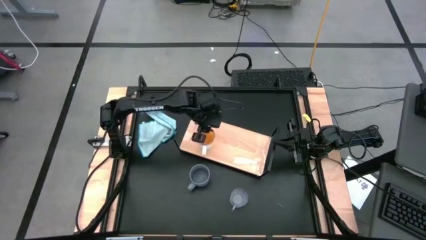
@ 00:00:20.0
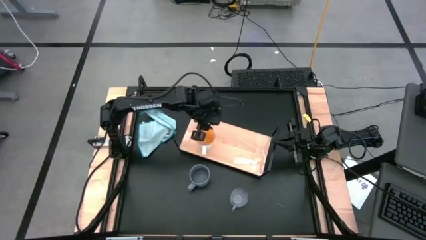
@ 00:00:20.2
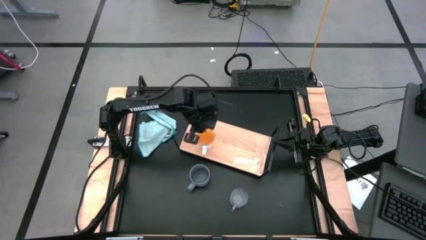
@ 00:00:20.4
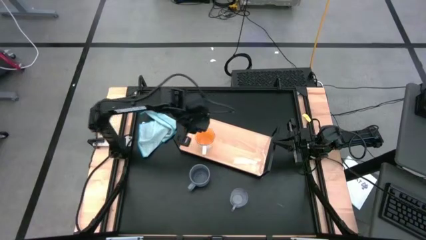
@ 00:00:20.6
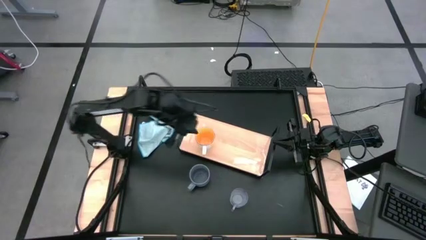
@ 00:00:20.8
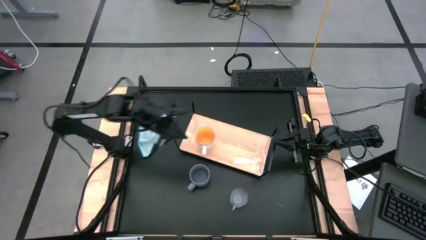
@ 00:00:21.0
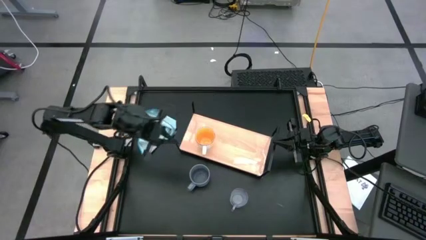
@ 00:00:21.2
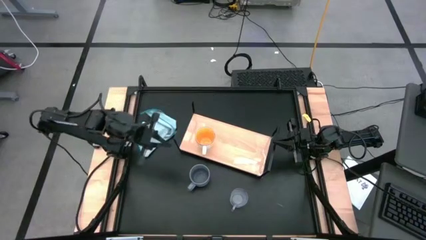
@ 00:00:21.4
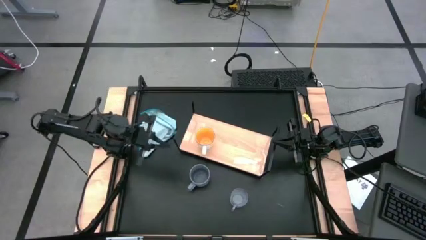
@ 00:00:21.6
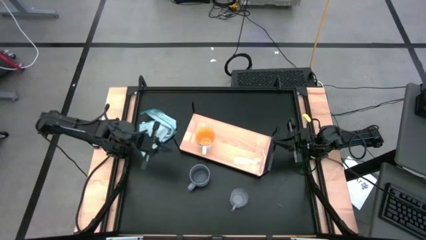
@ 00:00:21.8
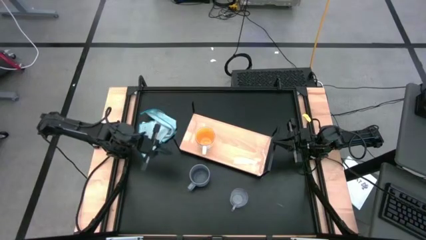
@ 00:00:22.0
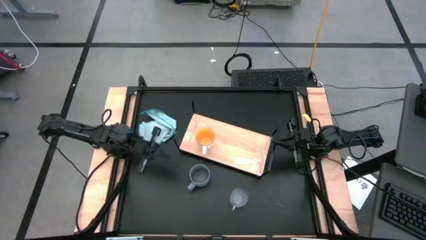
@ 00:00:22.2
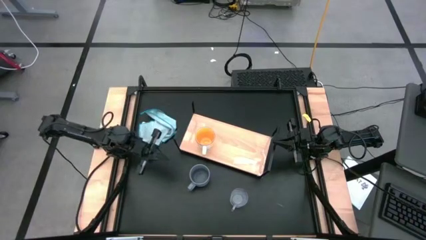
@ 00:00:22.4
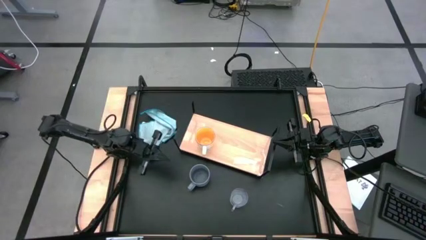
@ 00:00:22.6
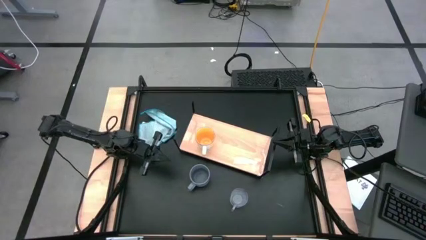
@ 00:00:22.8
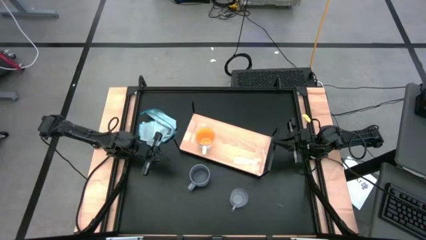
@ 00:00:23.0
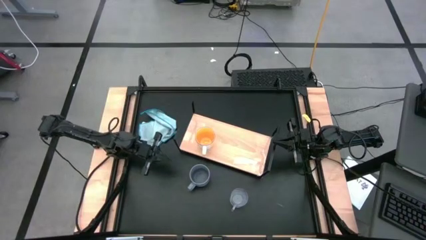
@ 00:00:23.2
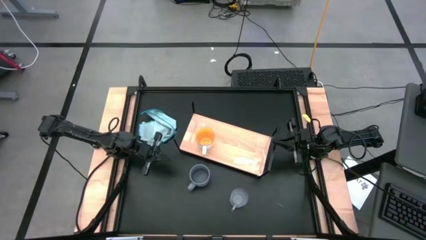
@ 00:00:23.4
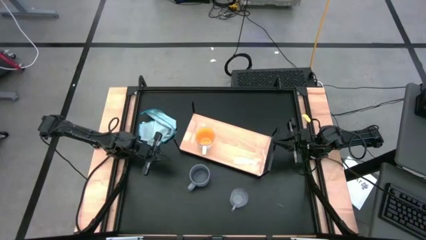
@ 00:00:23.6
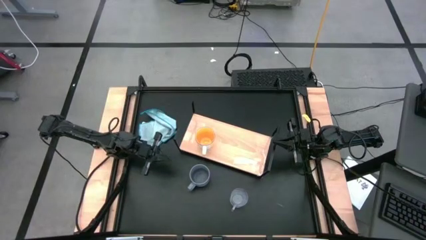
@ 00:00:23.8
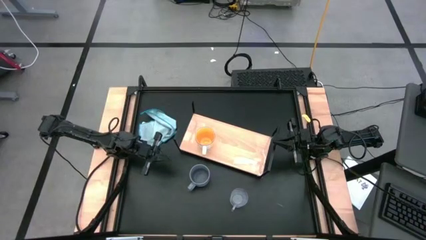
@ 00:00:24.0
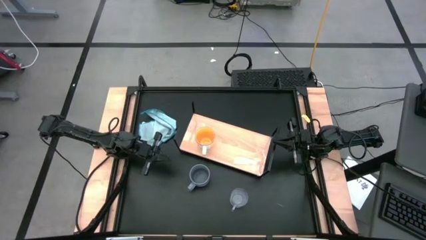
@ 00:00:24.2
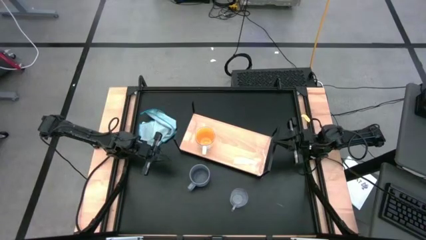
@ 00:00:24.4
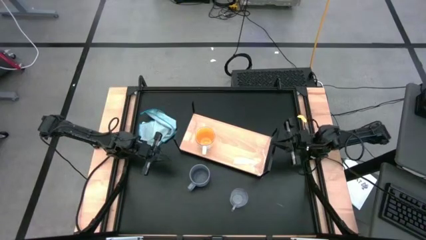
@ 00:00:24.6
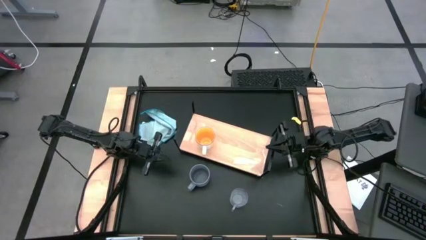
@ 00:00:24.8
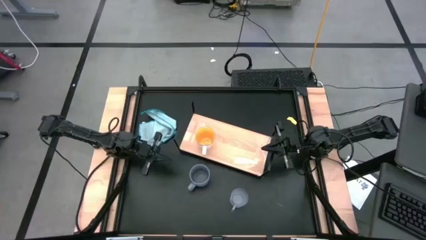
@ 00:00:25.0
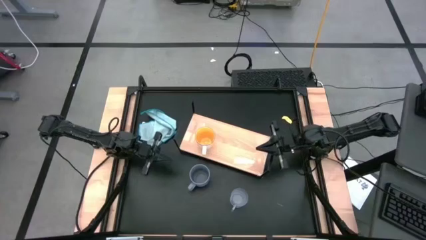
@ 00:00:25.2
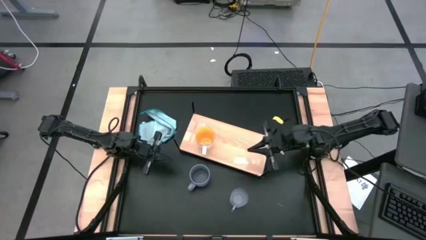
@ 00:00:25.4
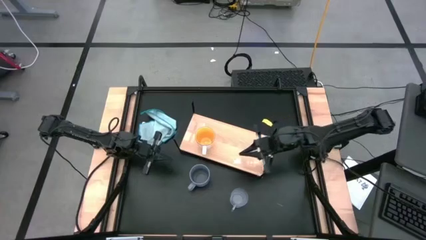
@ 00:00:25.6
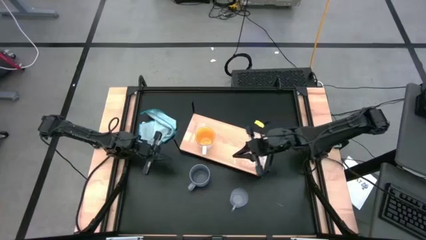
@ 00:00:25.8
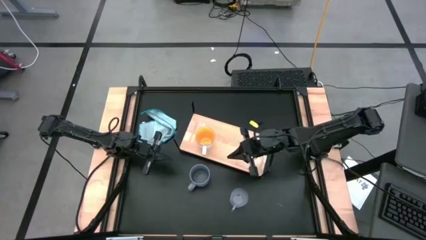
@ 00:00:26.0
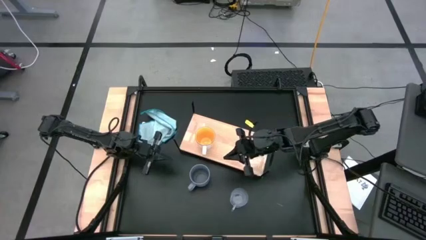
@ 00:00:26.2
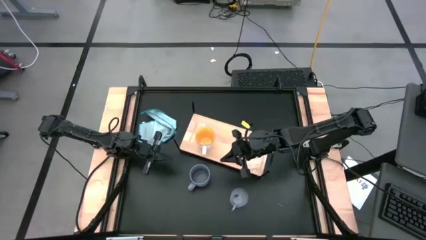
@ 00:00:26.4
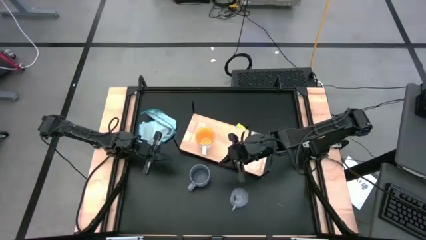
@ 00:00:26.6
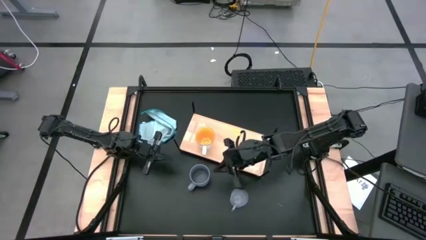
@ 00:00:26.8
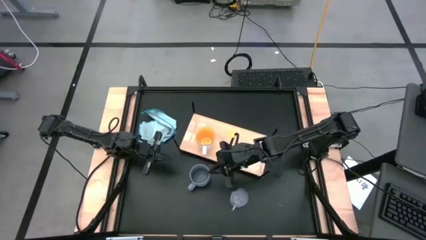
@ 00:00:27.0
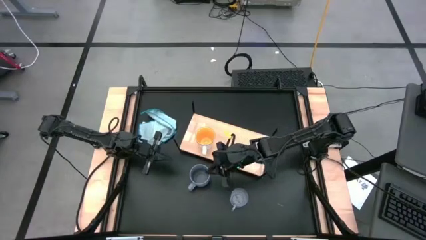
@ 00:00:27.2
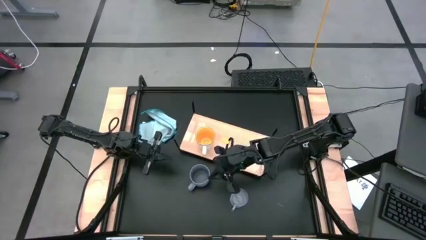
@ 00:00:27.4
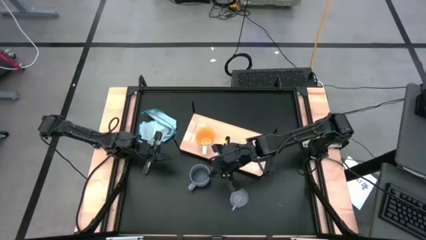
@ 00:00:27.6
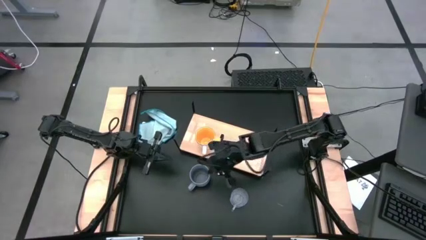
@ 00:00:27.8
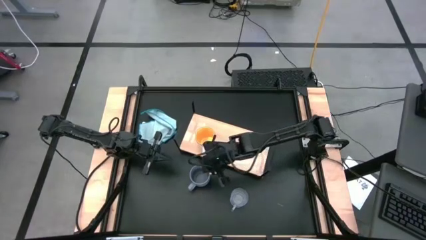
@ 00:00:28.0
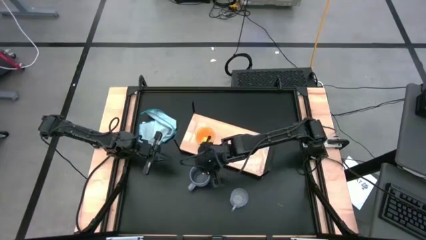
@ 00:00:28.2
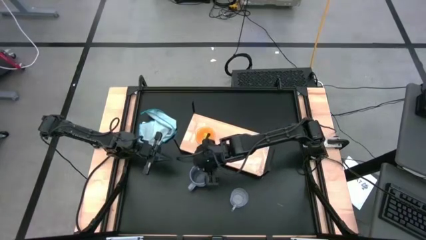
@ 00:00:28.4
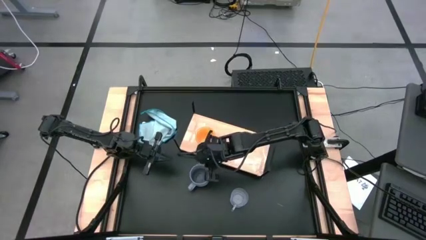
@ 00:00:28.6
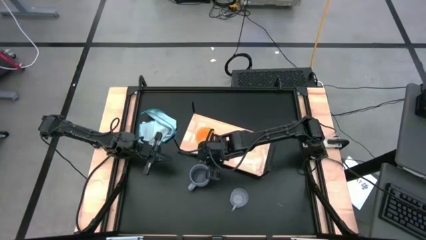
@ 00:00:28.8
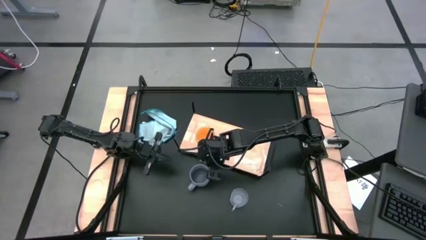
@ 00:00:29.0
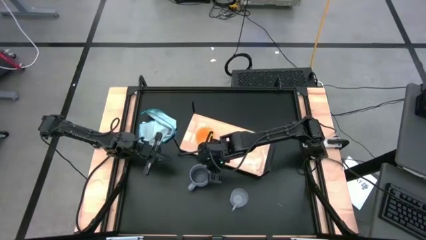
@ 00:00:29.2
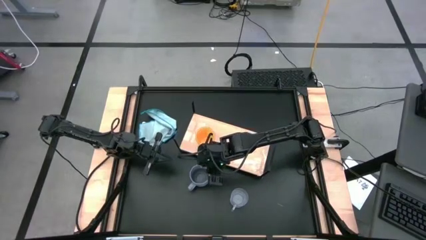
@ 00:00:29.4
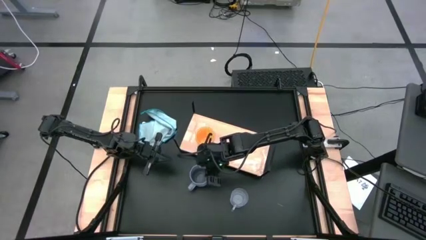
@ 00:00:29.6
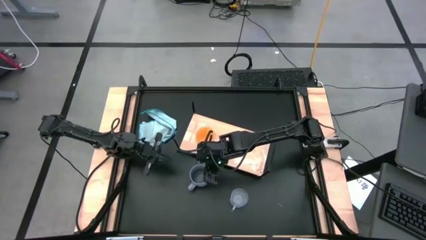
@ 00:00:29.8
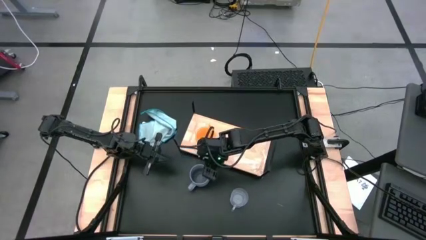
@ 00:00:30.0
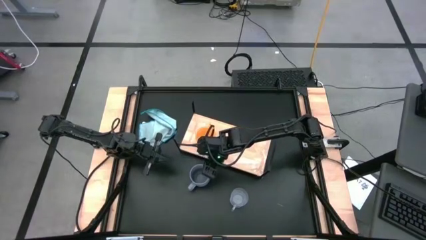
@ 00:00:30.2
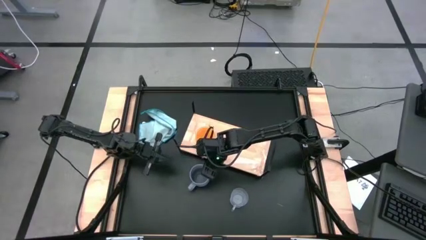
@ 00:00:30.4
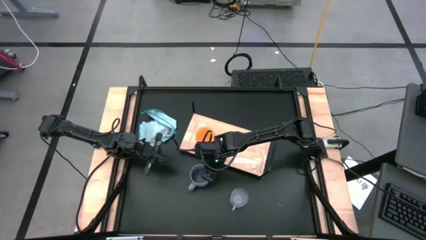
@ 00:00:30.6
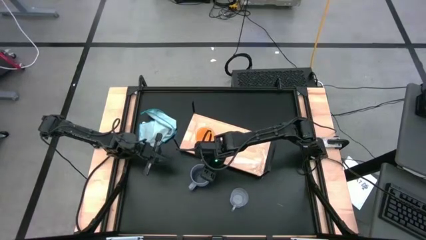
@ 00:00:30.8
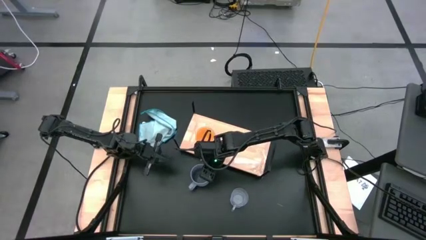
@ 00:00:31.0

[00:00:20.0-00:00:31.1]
Task: Stack small to large cups/mugs on shelf
Put the gray cup on the shelf
